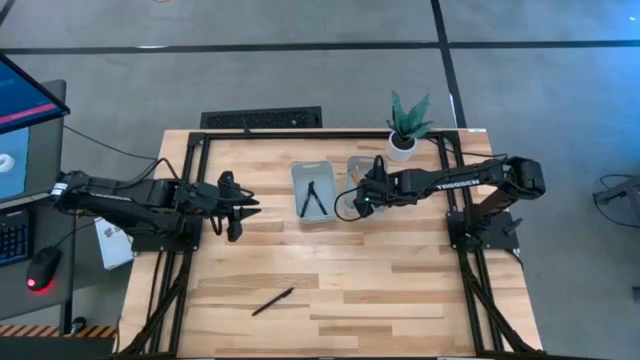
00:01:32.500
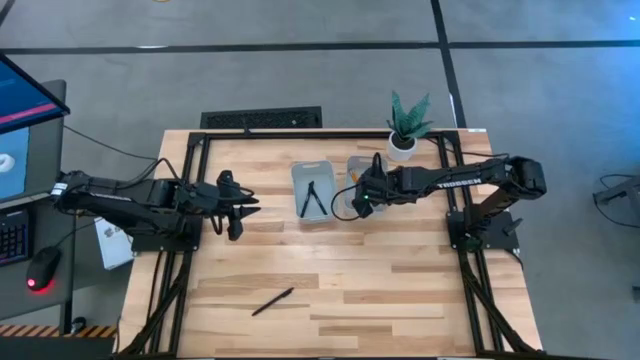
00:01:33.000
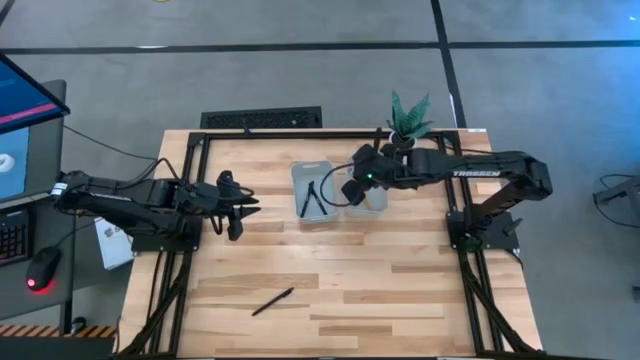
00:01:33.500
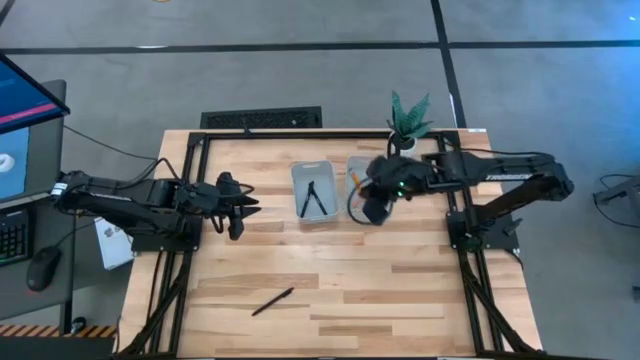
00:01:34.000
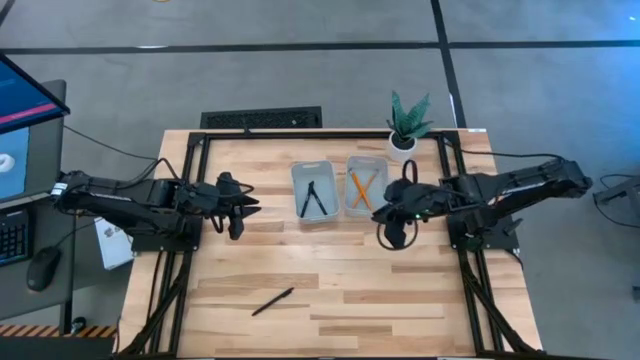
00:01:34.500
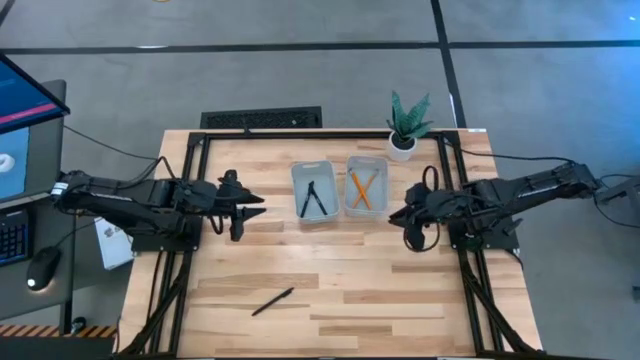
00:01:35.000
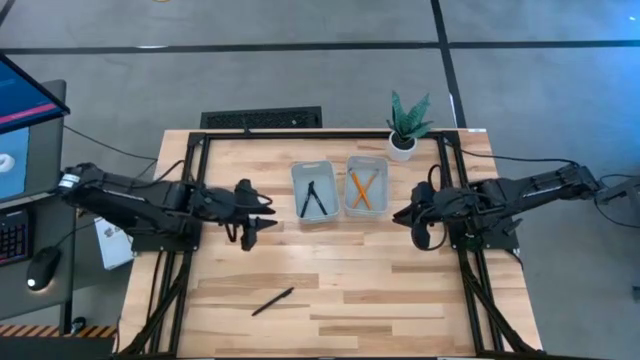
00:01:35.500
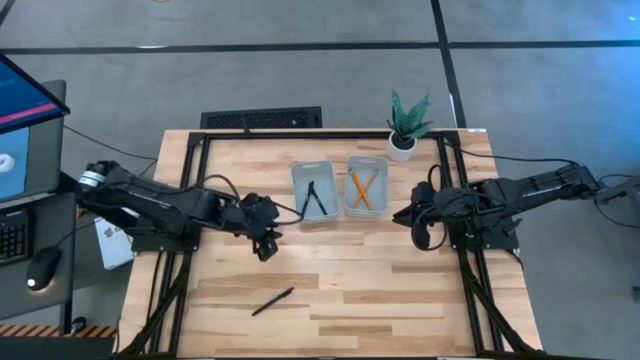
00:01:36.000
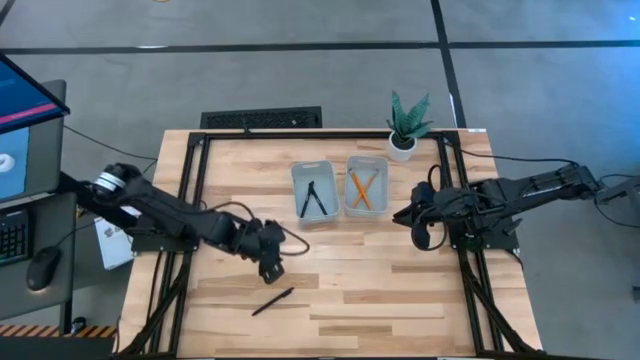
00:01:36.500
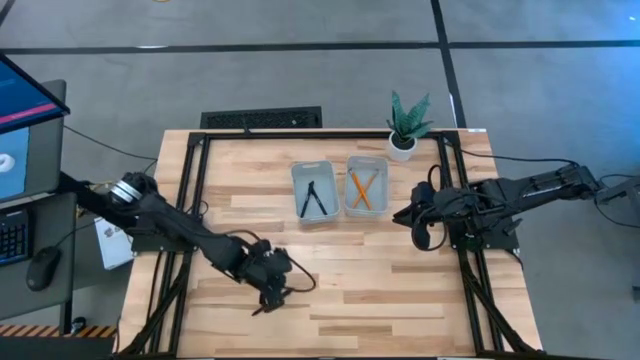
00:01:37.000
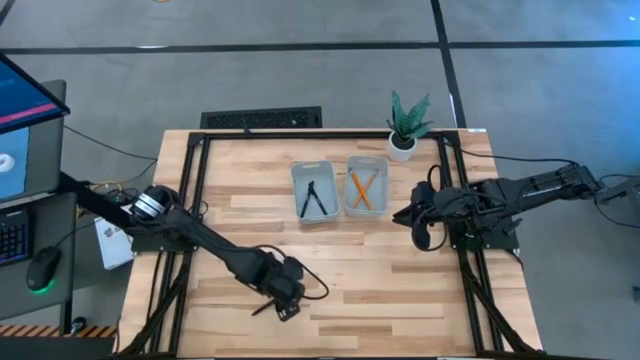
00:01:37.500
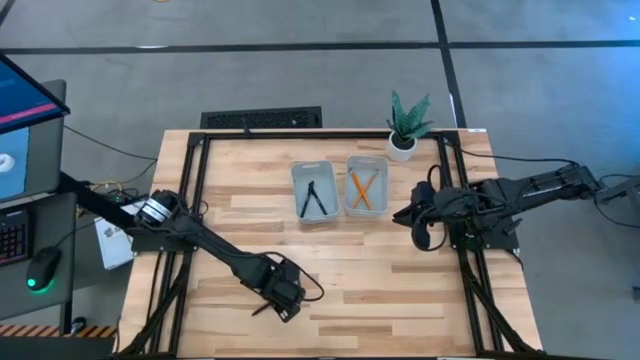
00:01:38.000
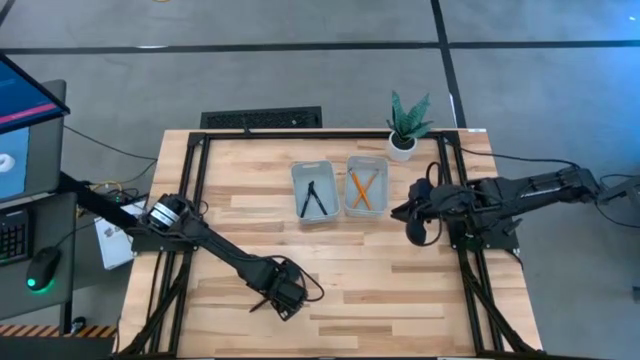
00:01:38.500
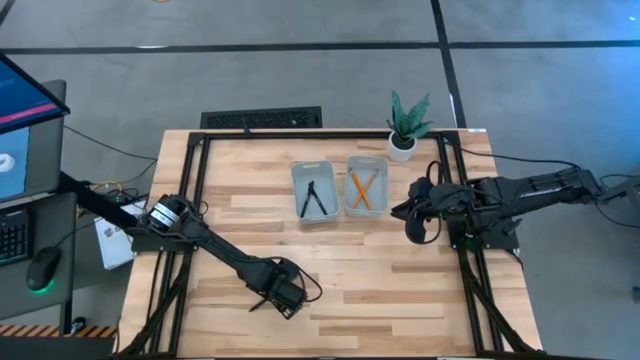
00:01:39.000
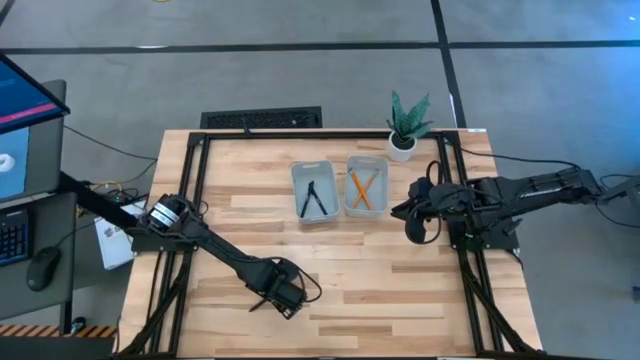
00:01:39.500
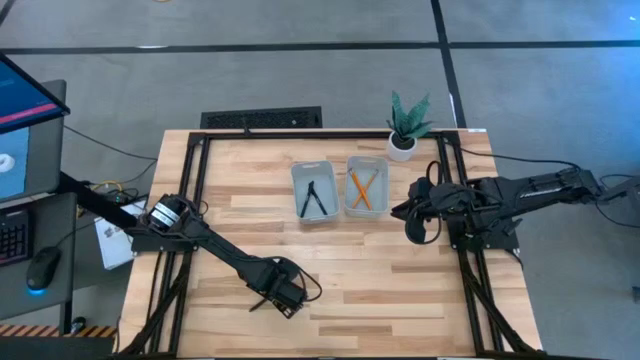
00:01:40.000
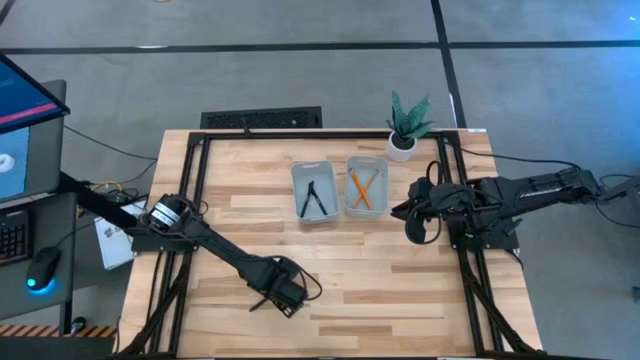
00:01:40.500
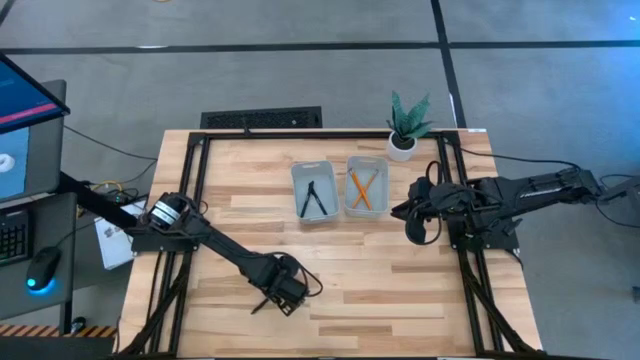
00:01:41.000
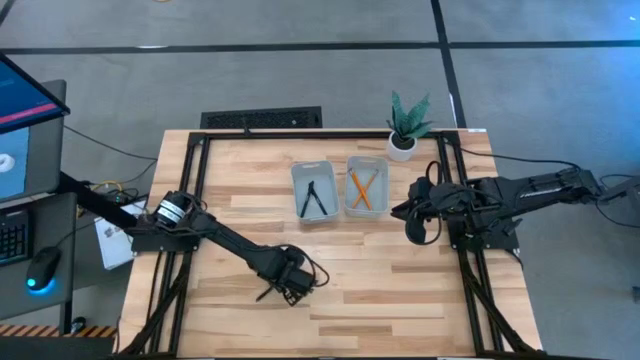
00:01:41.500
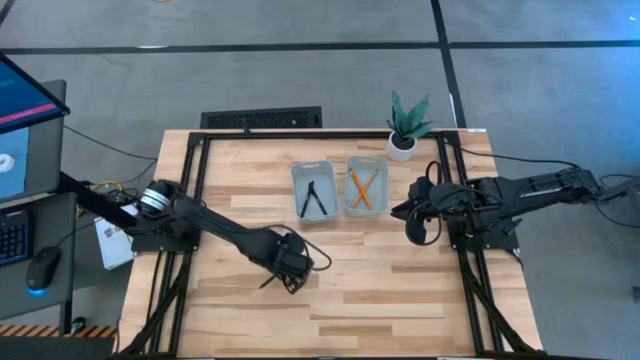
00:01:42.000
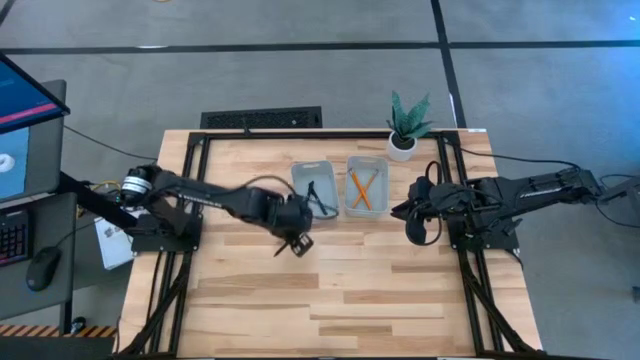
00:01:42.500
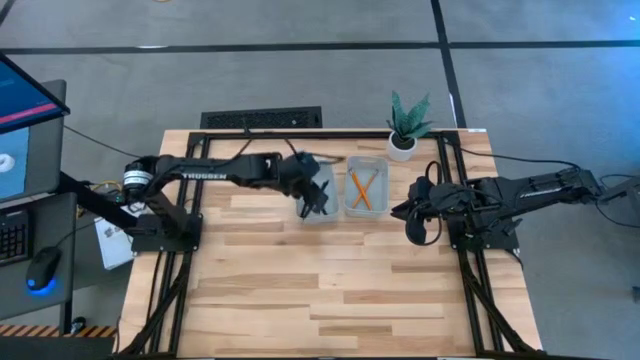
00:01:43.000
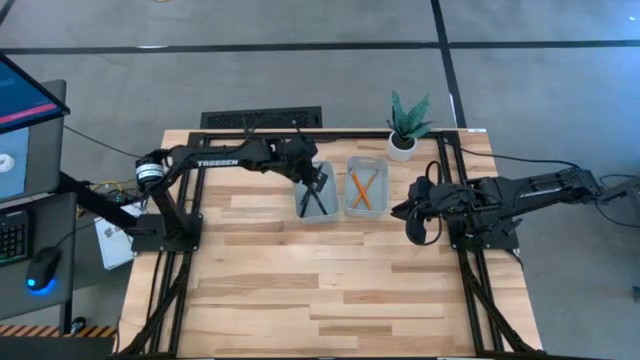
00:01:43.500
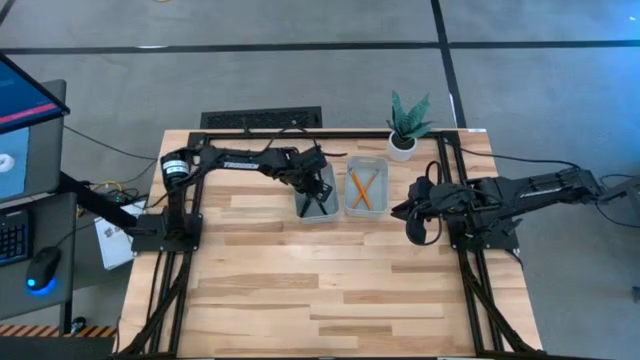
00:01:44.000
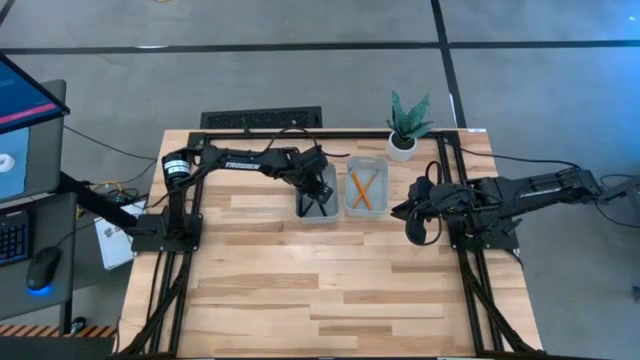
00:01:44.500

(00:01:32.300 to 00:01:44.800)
Task: Sort pens & pencils
Put the black pen into the left gray bin

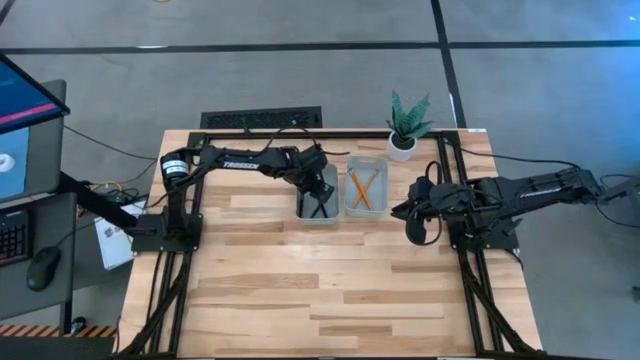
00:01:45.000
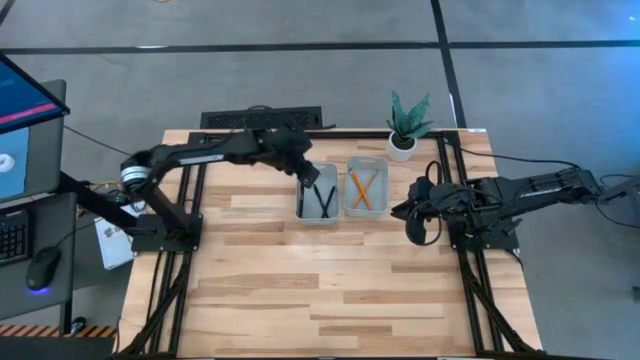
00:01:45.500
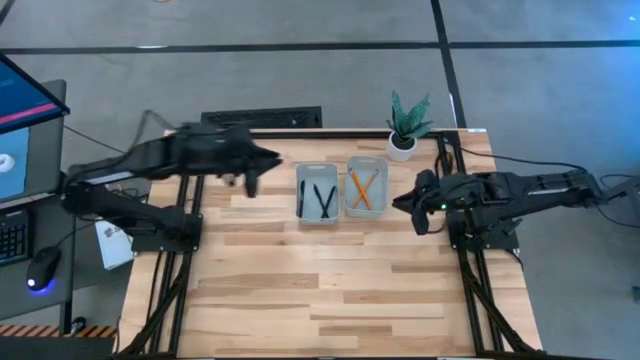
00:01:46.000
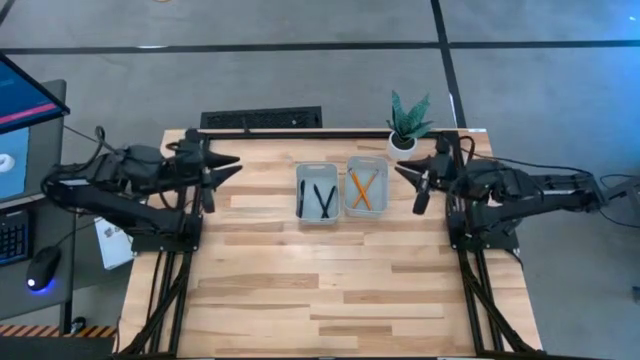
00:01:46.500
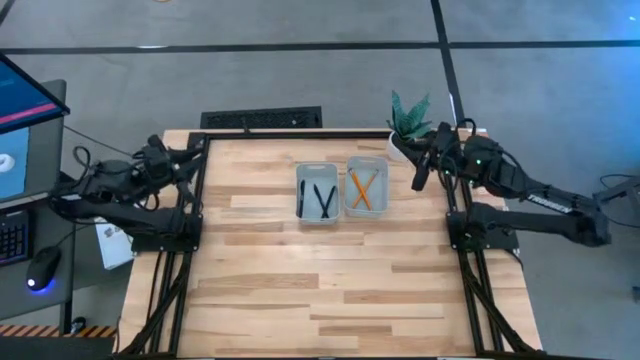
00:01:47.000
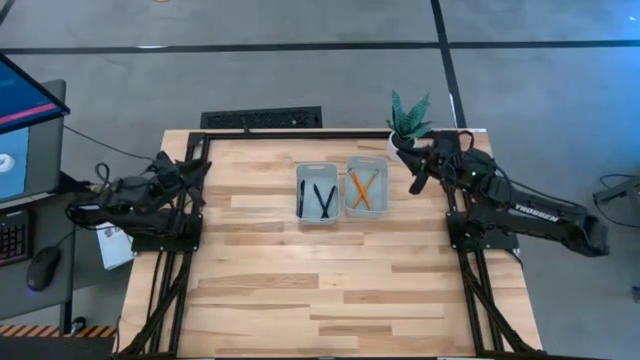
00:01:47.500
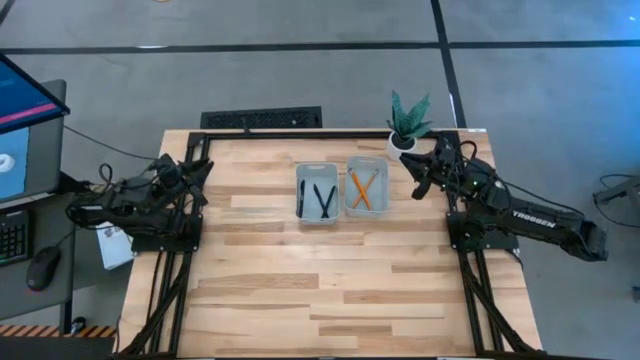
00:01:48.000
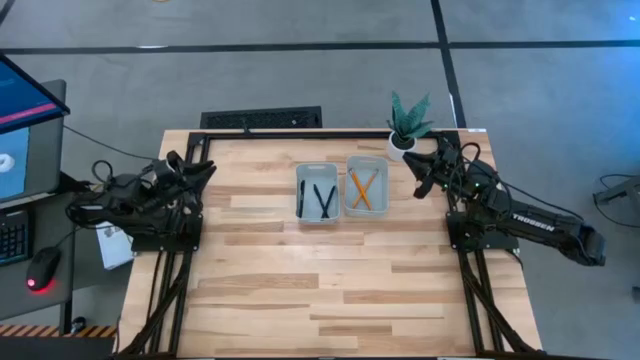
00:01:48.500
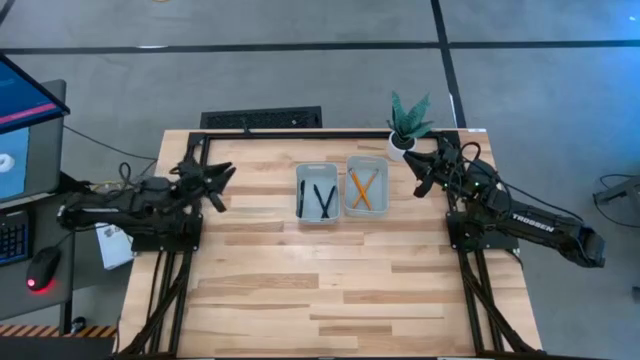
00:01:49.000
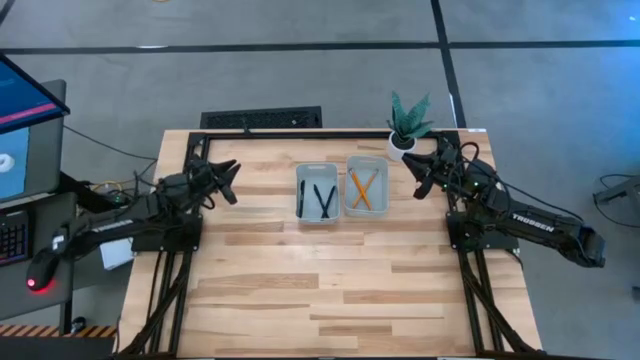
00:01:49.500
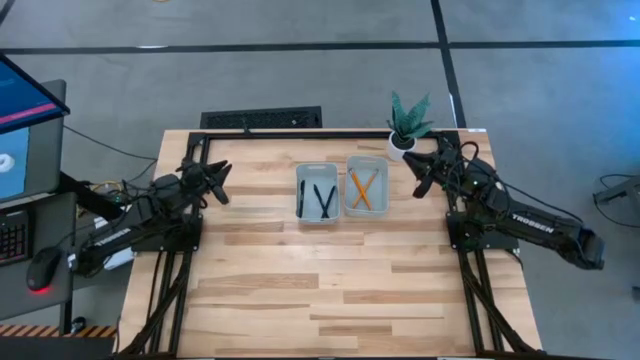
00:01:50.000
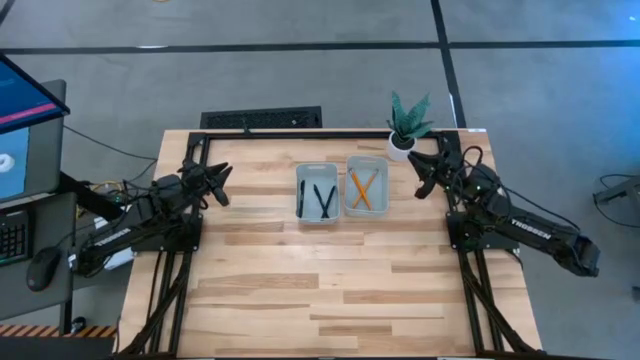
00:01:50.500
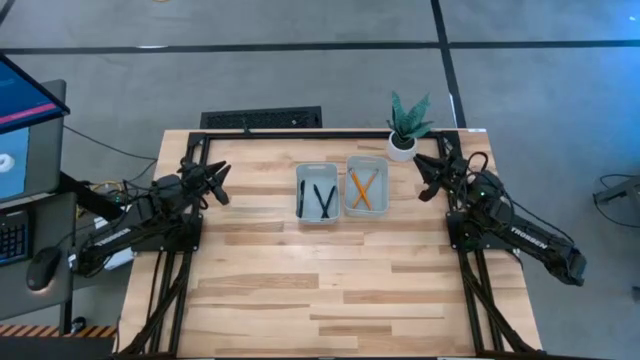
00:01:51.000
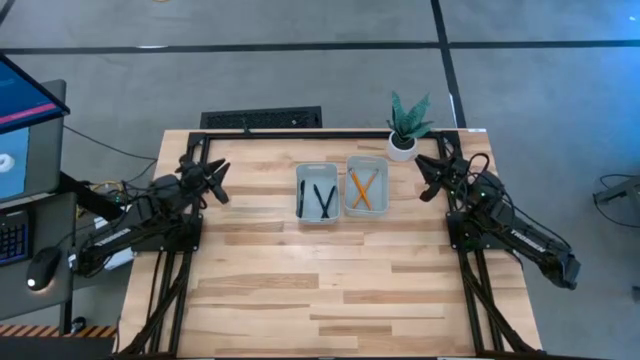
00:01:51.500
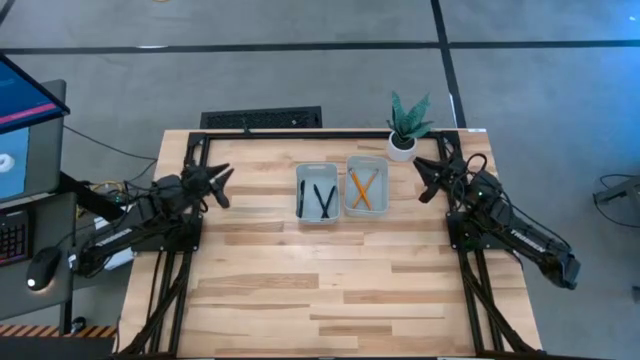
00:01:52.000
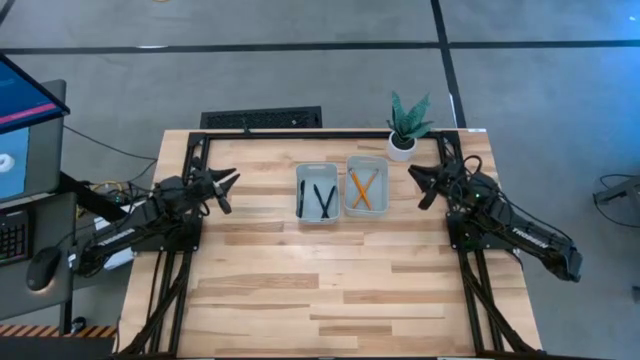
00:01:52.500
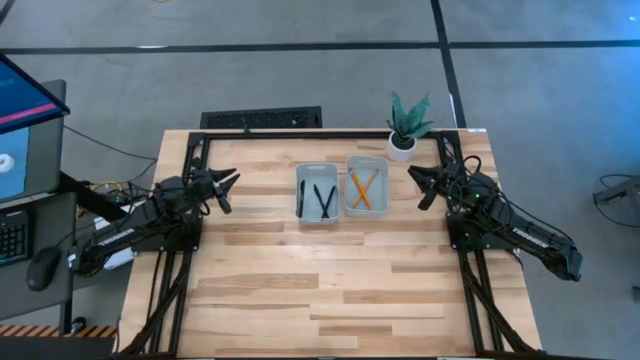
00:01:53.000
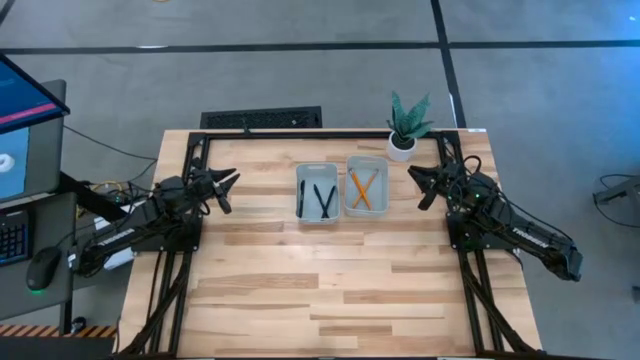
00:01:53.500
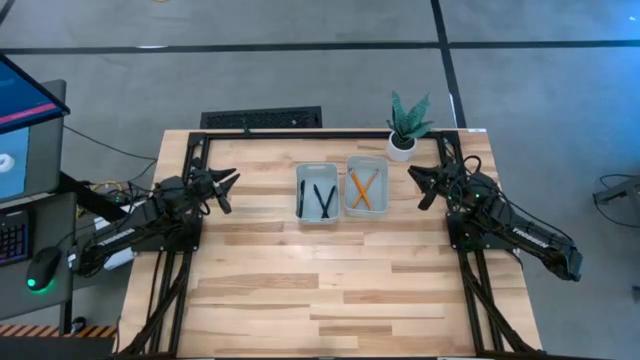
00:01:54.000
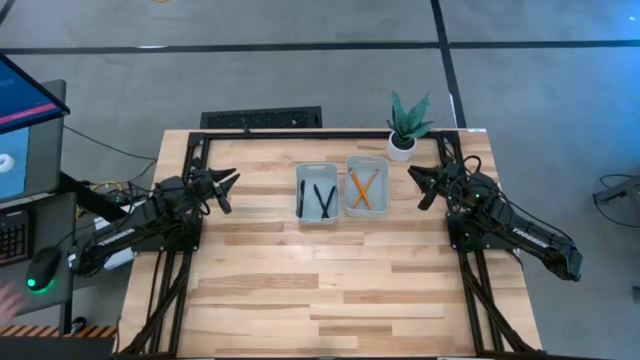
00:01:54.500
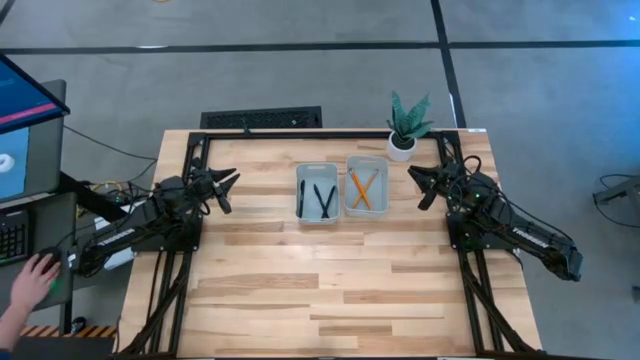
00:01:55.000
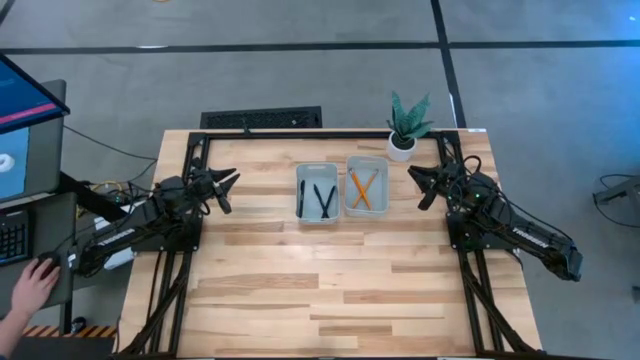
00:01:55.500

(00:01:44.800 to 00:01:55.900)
Return to Home Position
